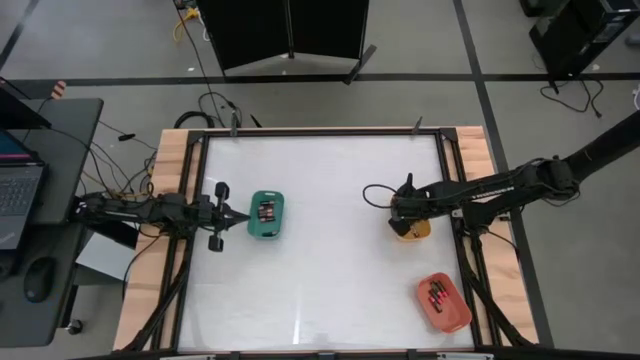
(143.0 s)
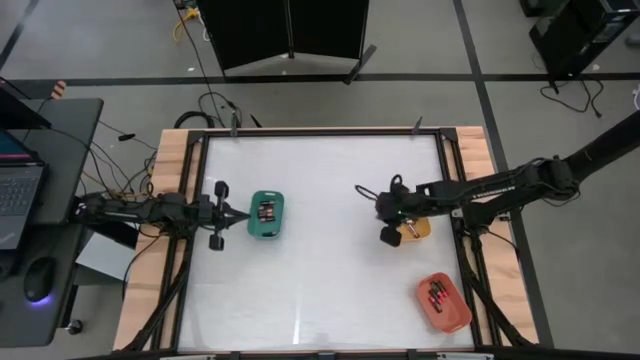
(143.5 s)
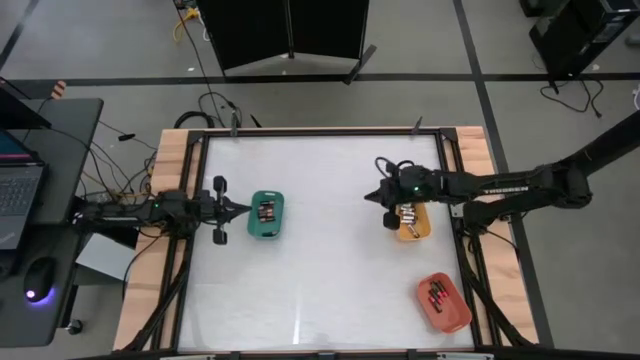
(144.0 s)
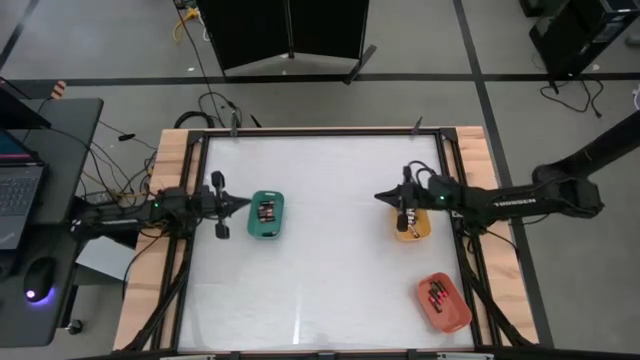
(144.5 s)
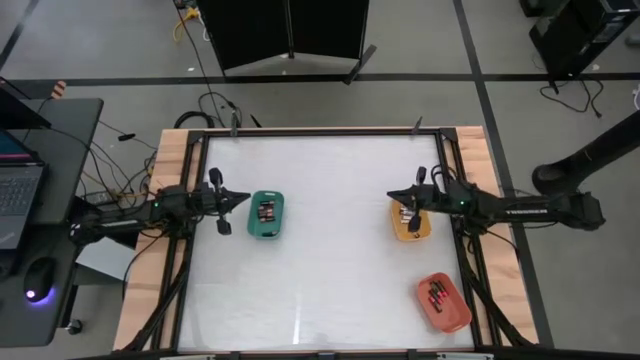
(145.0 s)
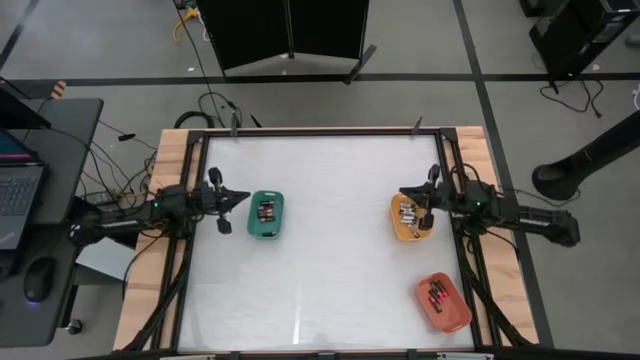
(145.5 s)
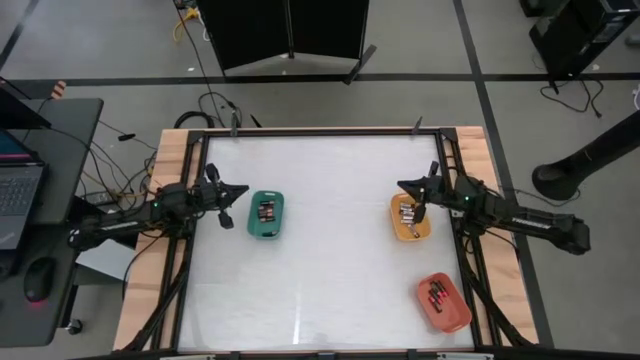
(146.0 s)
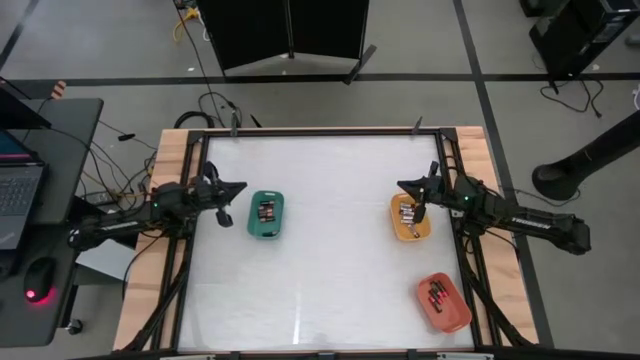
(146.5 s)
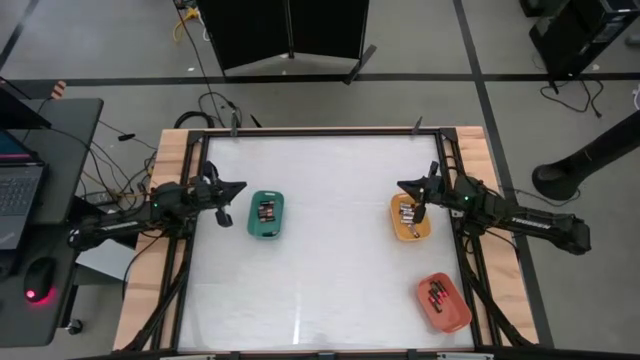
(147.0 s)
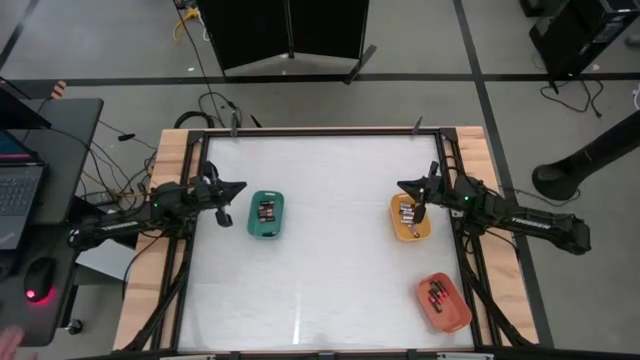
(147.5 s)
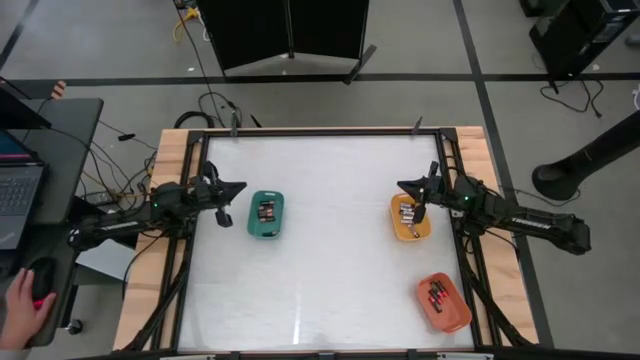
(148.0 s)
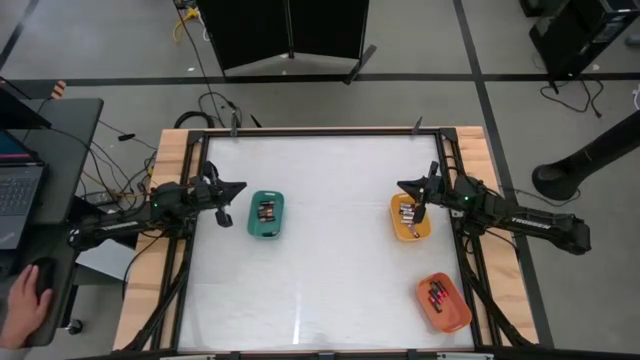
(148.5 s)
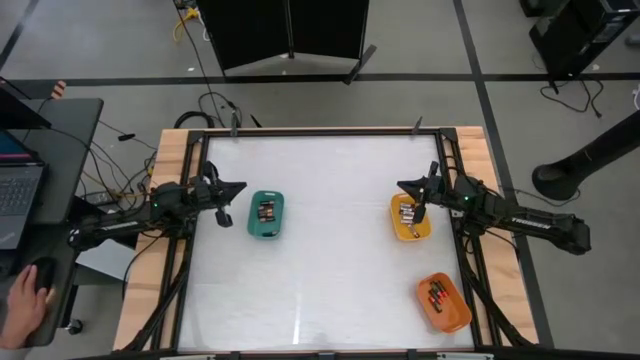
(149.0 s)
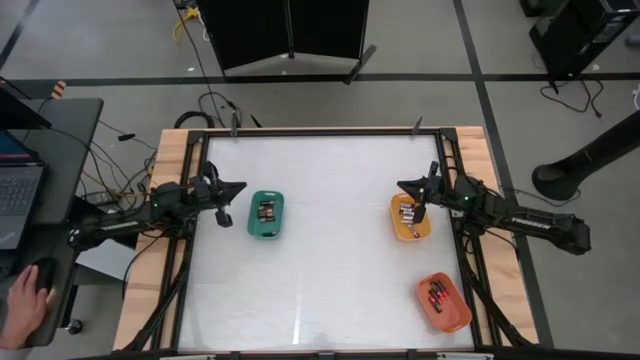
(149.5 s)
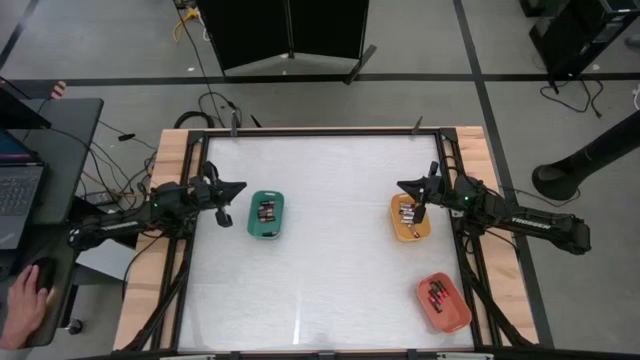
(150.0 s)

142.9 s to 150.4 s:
Task: Sort batteries
Return to Home Position

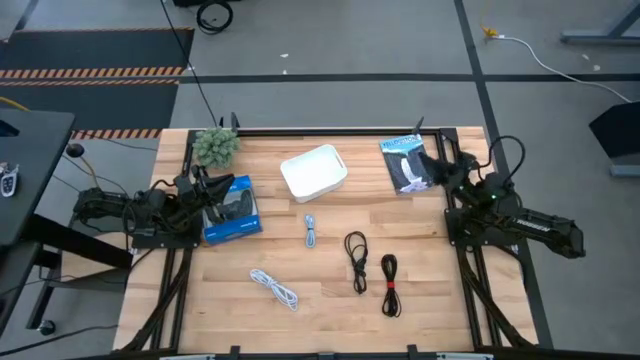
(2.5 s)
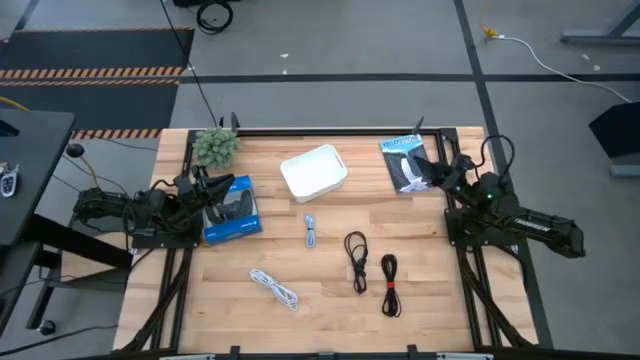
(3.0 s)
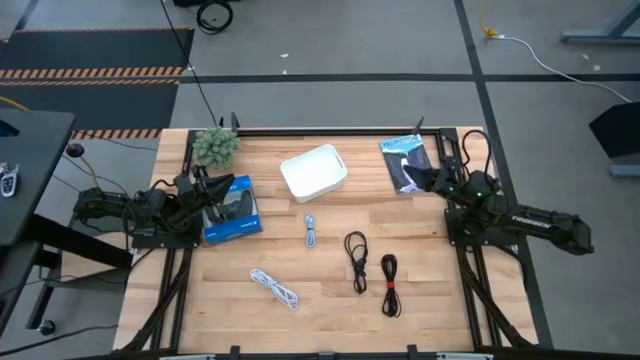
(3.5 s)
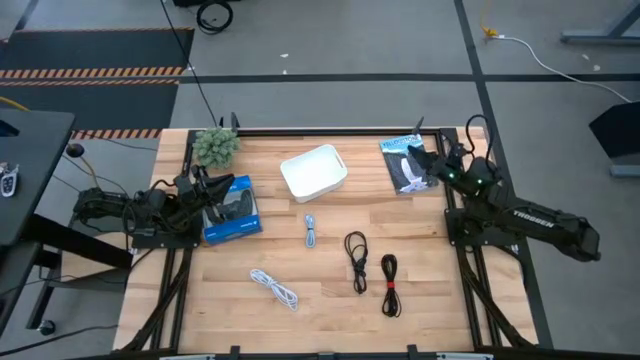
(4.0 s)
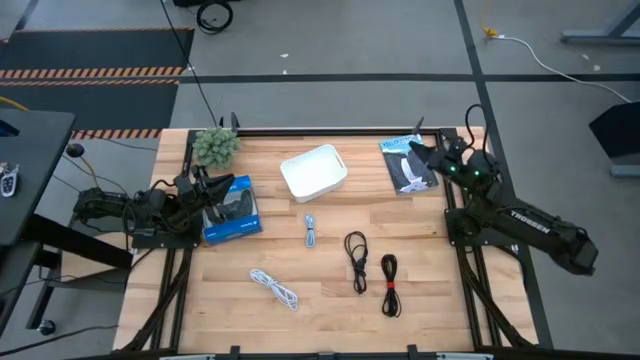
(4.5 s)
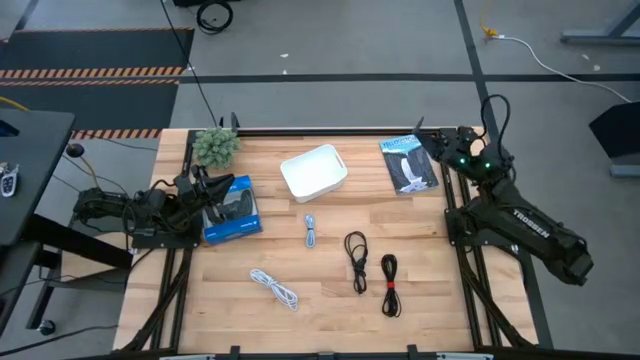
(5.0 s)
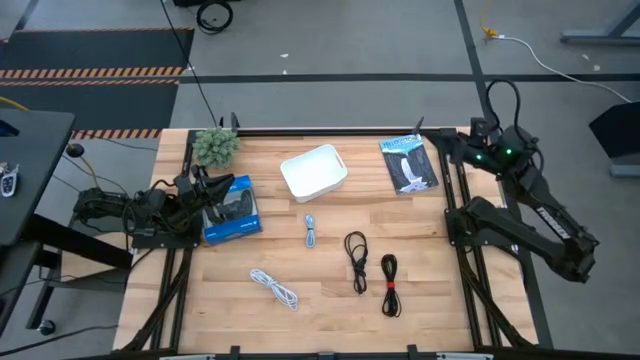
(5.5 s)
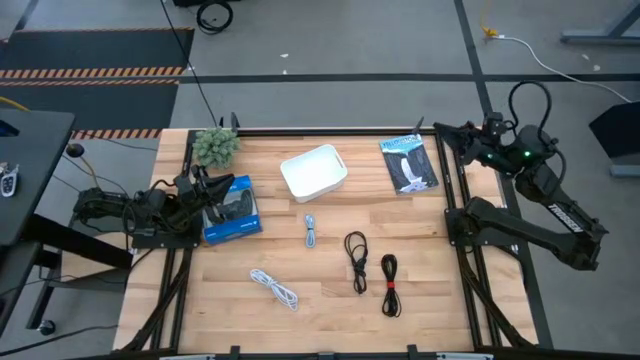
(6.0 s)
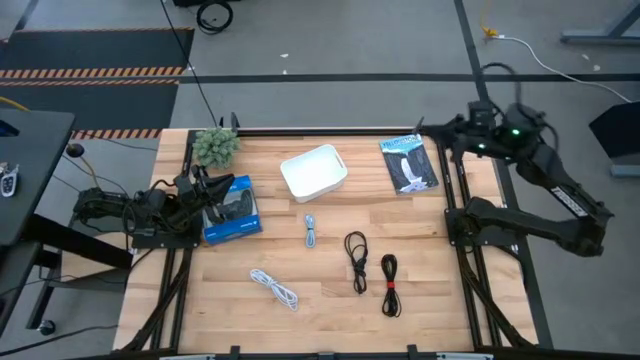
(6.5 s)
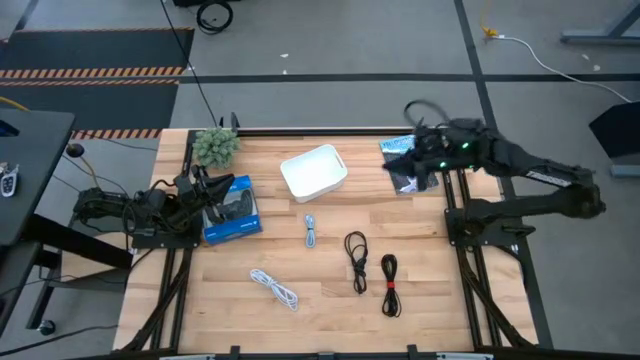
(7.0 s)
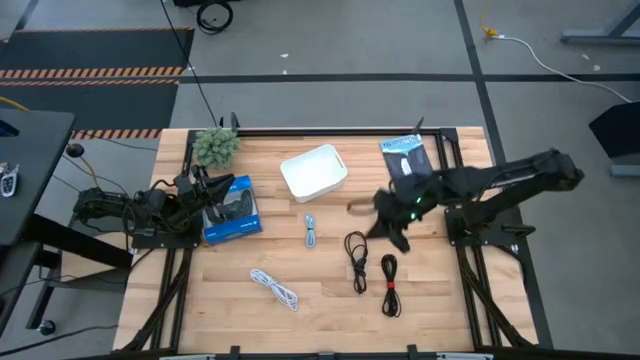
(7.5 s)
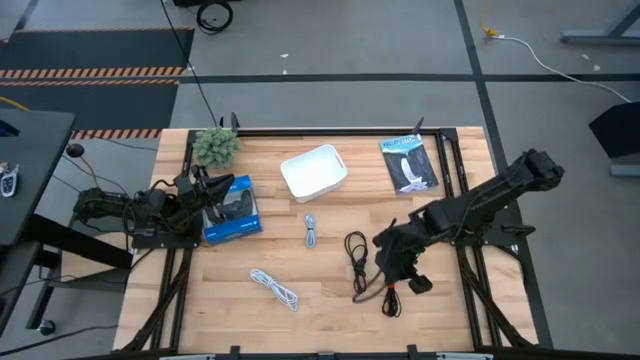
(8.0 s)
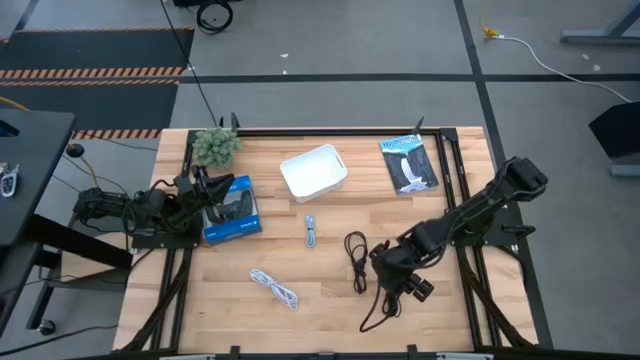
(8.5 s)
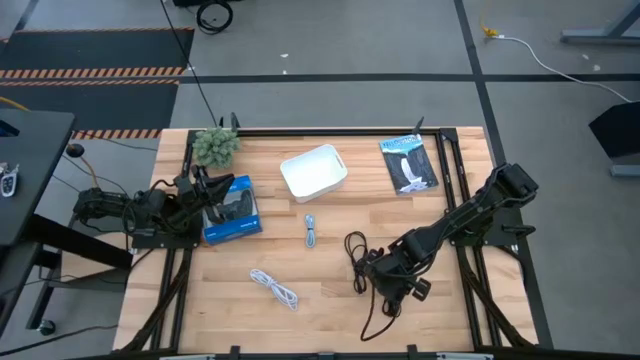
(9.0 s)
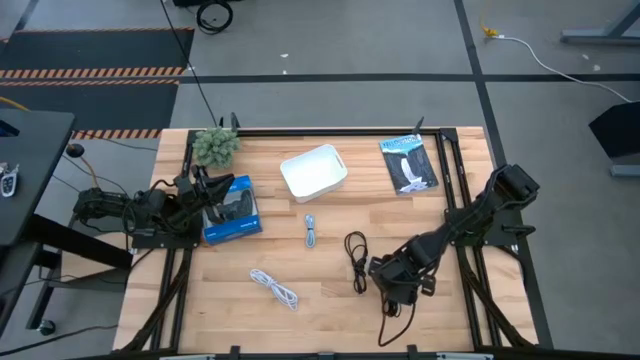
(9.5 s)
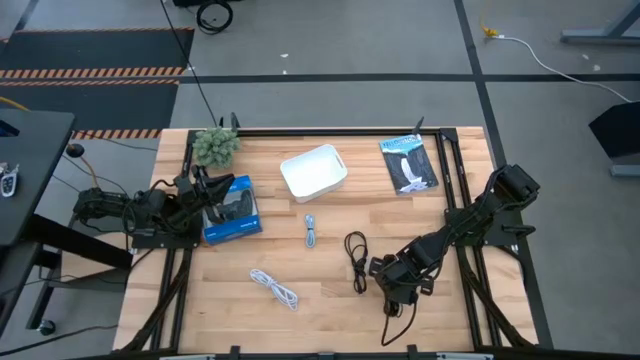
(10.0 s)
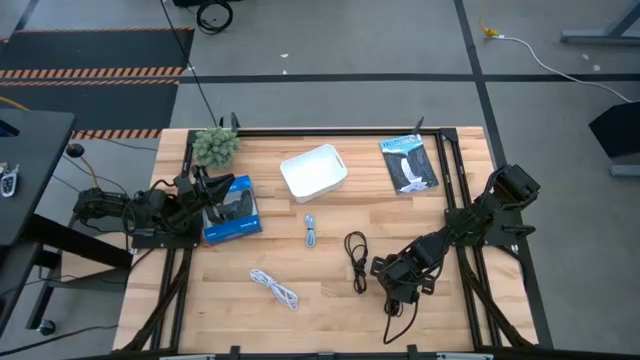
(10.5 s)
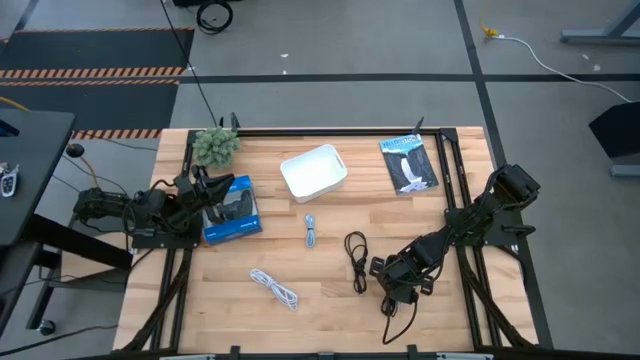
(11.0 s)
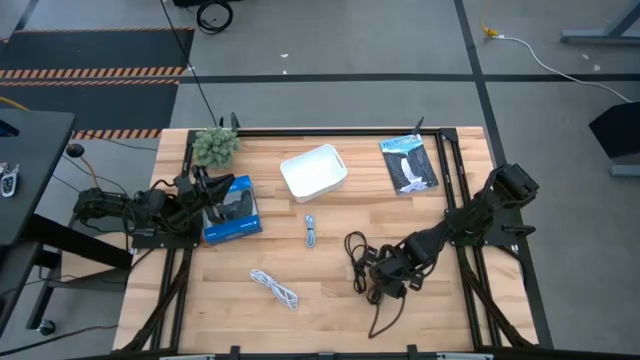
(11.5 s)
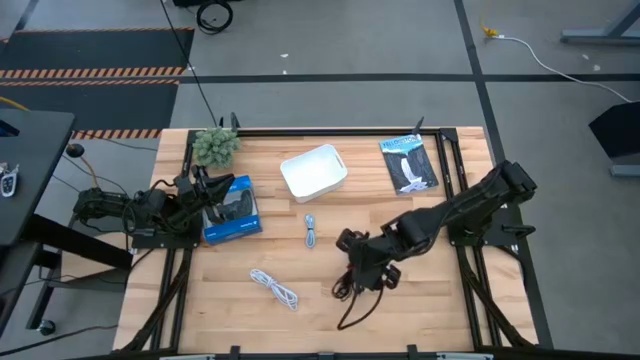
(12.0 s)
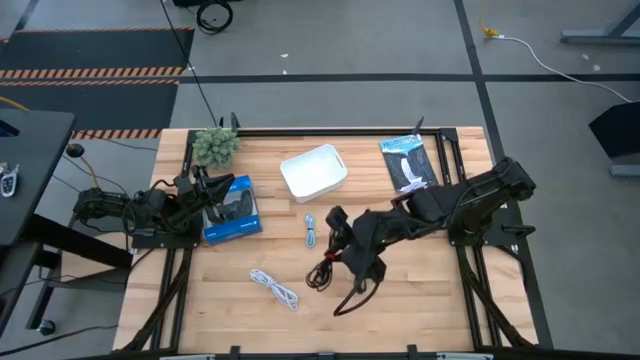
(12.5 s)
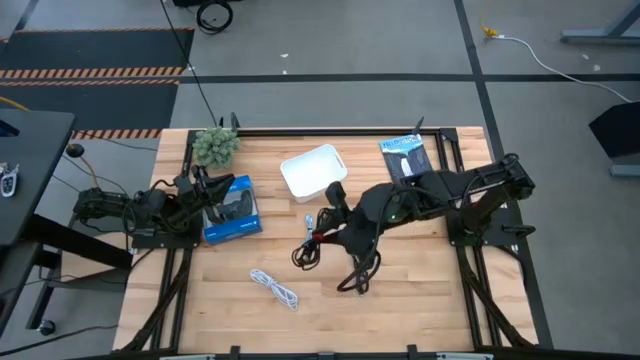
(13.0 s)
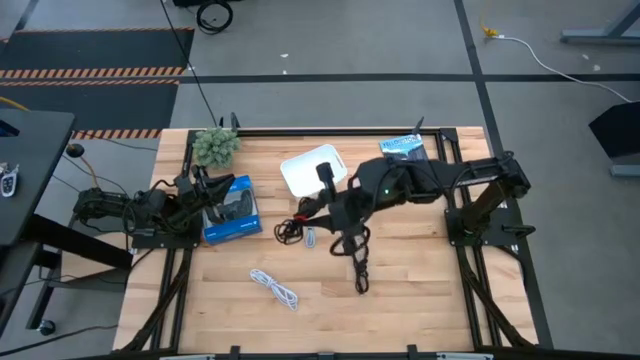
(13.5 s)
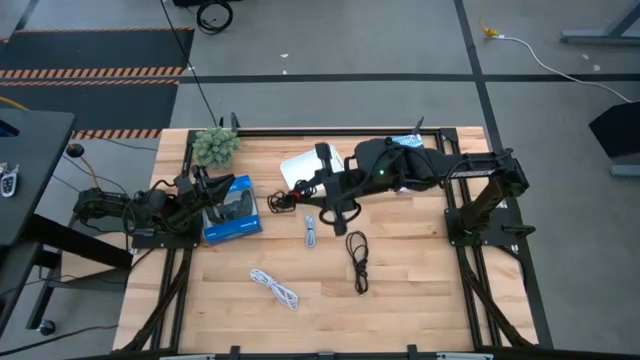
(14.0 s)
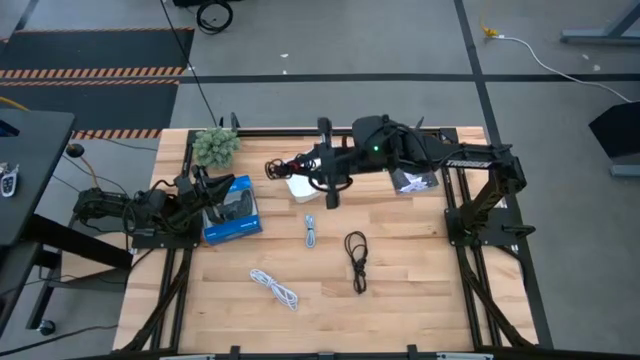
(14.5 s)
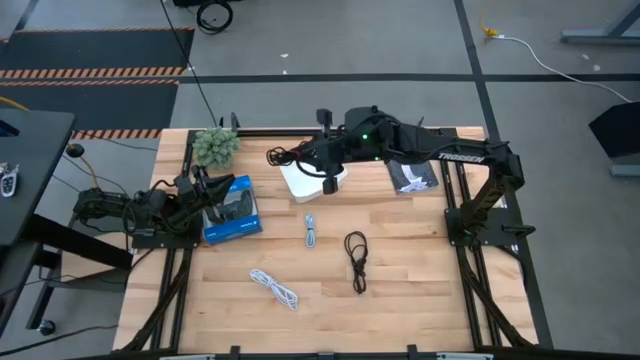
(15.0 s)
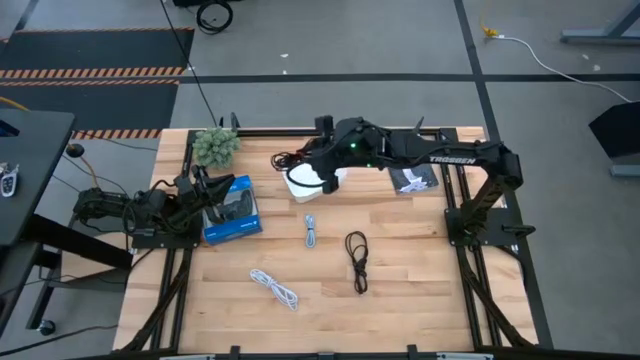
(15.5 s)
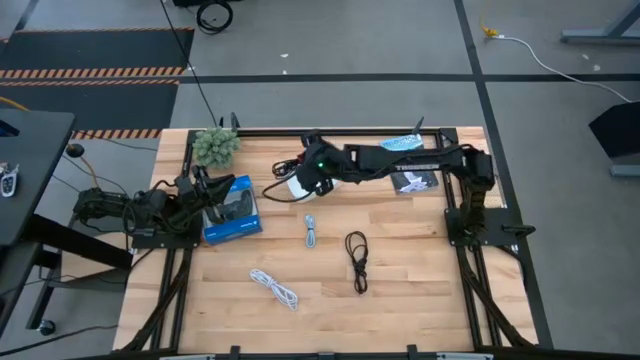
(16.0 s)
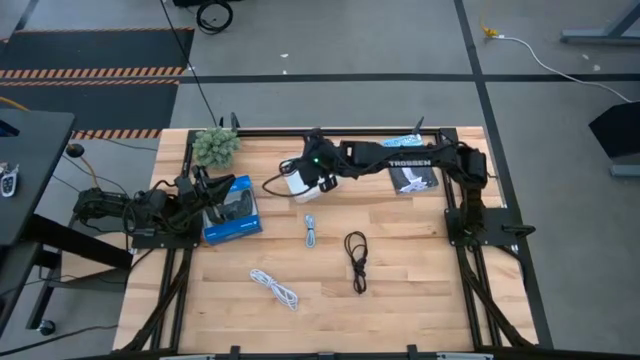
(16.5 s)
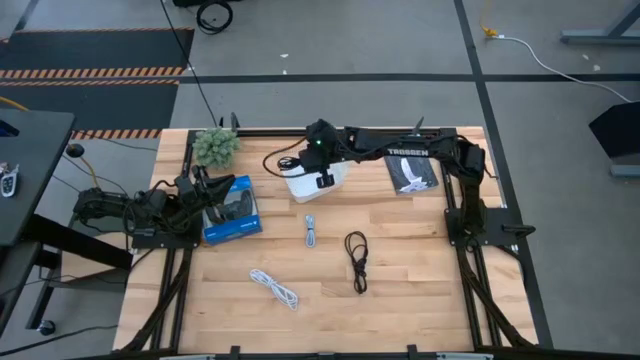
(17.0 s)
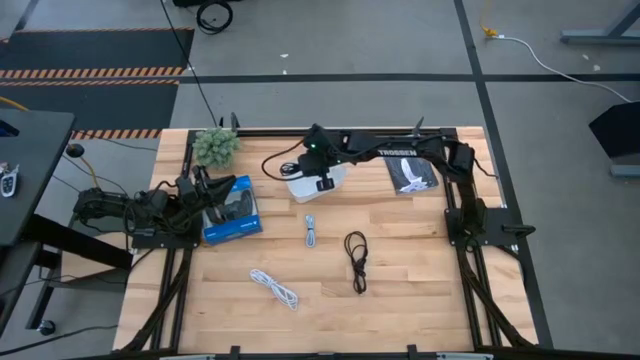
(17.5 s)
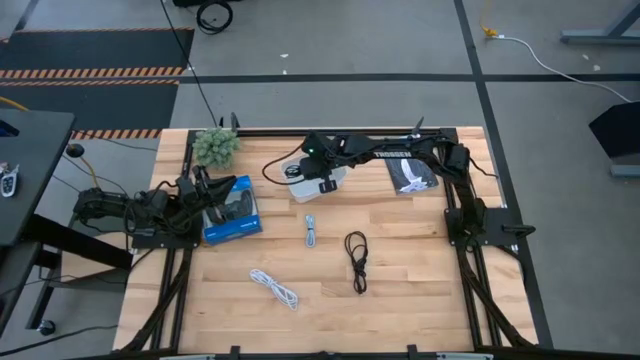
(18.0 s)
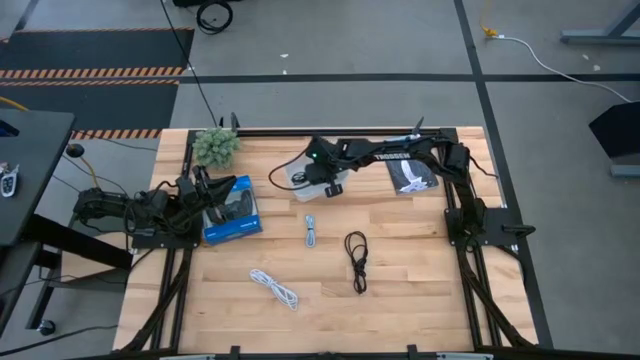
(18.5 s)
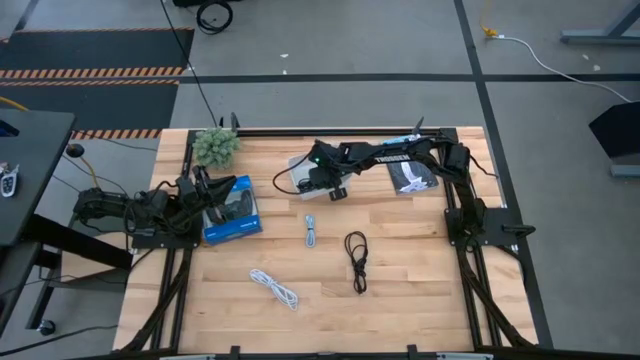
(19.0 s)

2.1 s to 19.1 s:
Task: Pick and place USB-C Cables
Put the right black USB cable into the white bin
